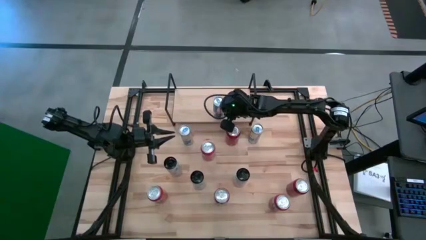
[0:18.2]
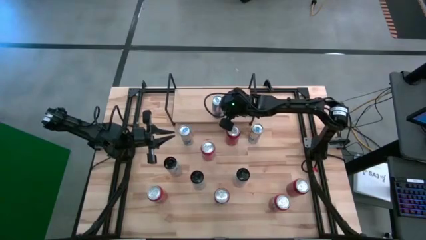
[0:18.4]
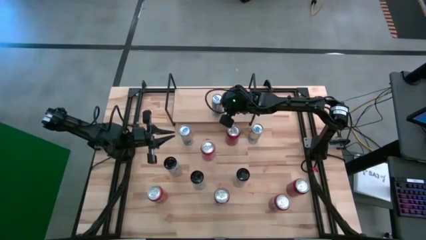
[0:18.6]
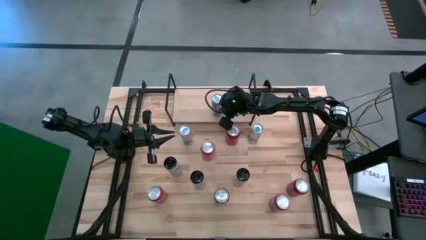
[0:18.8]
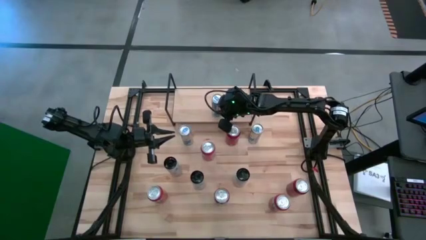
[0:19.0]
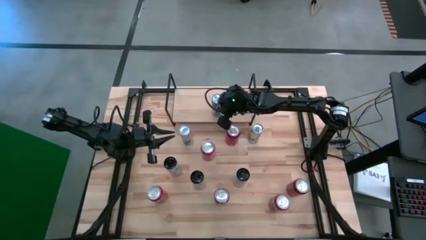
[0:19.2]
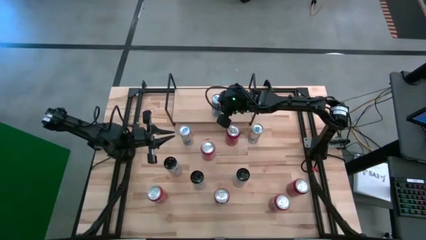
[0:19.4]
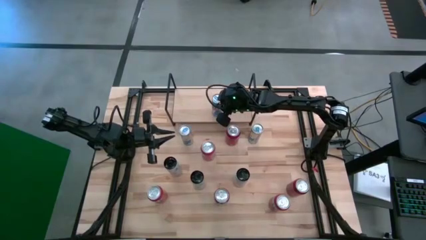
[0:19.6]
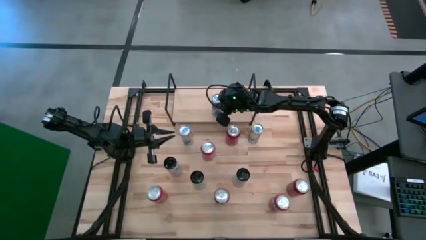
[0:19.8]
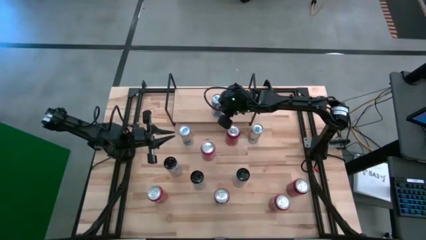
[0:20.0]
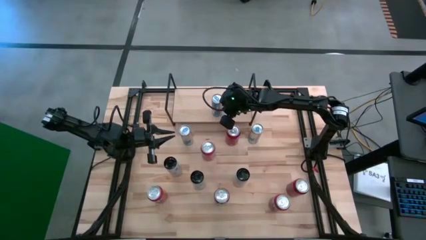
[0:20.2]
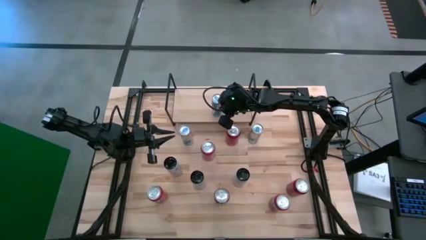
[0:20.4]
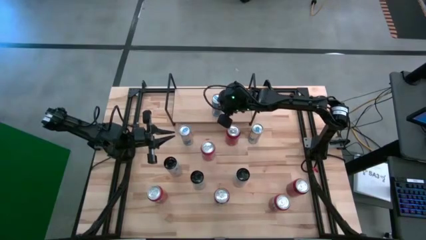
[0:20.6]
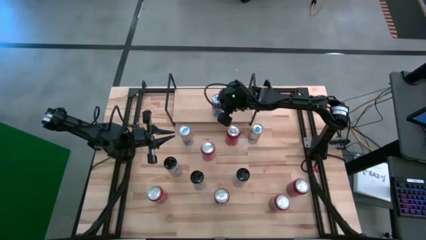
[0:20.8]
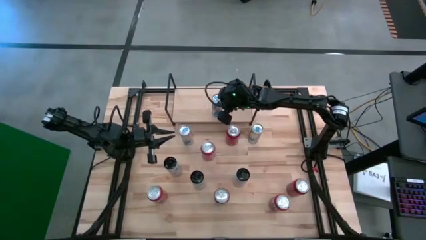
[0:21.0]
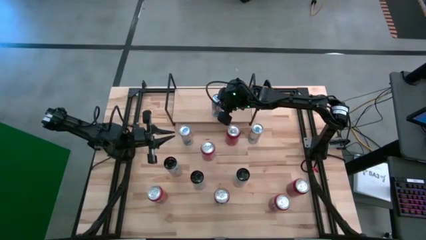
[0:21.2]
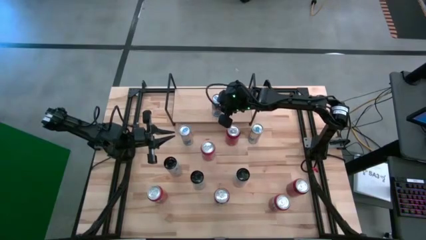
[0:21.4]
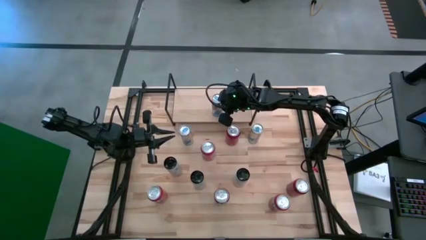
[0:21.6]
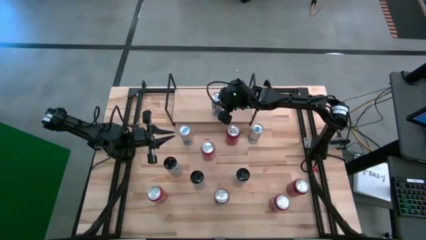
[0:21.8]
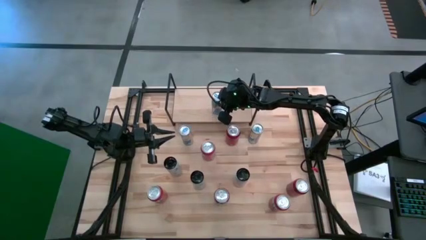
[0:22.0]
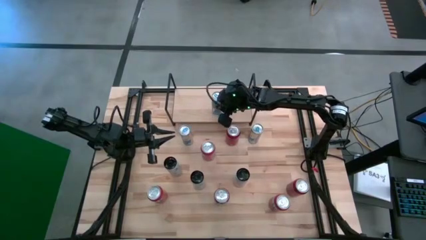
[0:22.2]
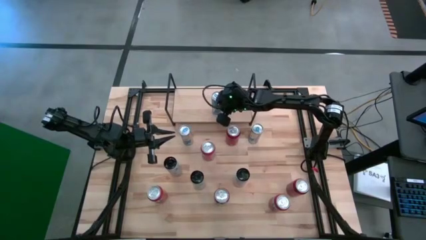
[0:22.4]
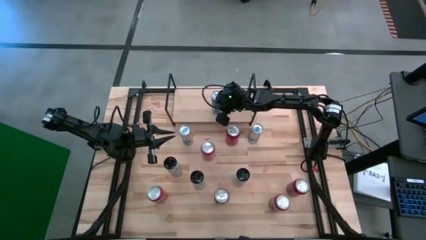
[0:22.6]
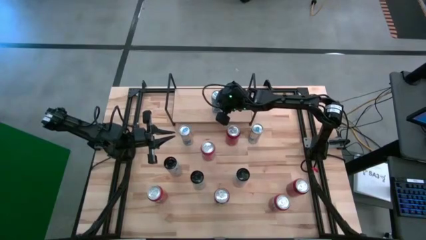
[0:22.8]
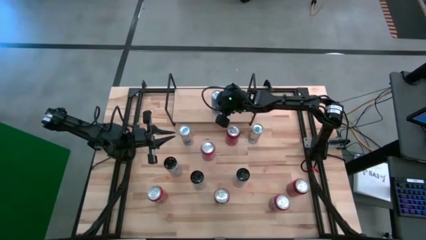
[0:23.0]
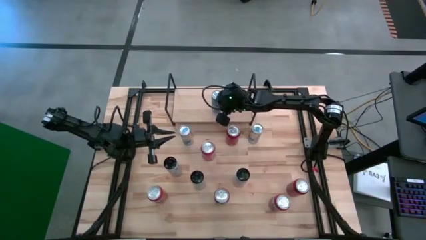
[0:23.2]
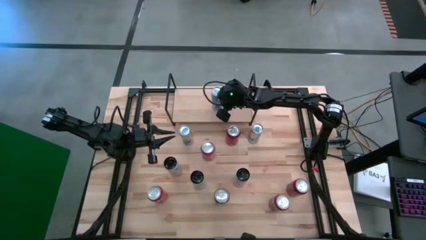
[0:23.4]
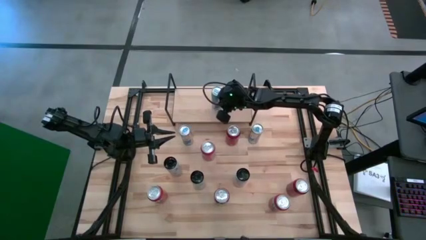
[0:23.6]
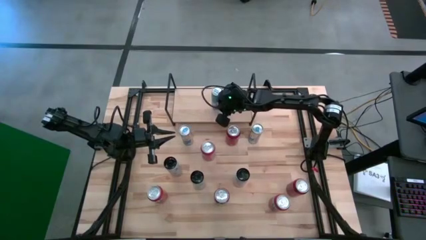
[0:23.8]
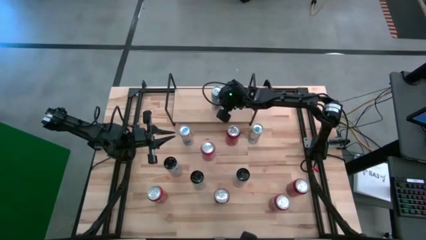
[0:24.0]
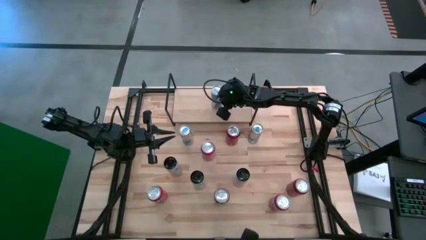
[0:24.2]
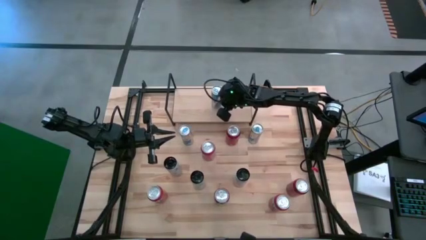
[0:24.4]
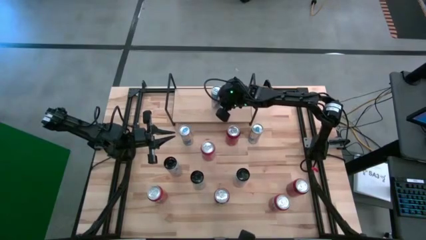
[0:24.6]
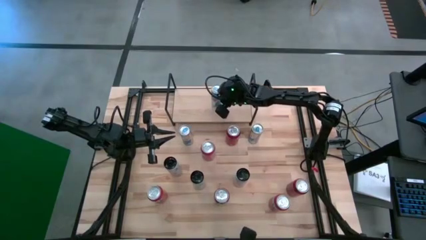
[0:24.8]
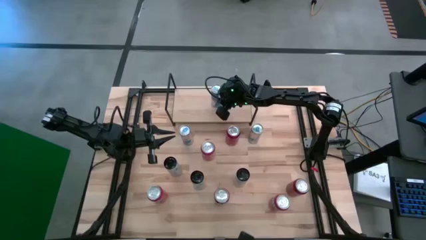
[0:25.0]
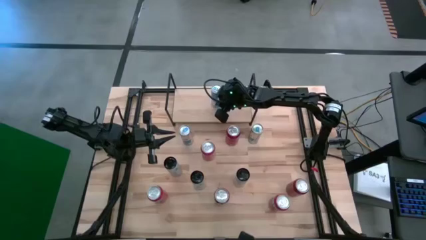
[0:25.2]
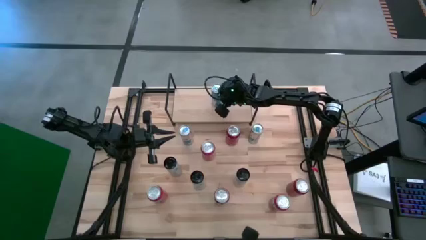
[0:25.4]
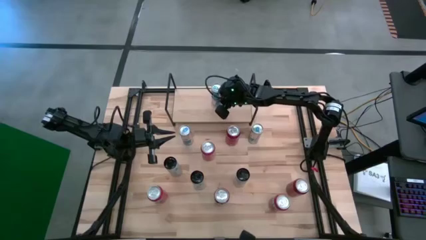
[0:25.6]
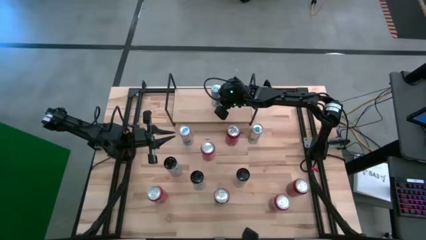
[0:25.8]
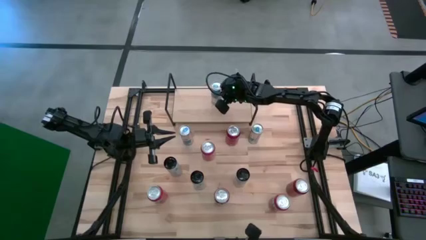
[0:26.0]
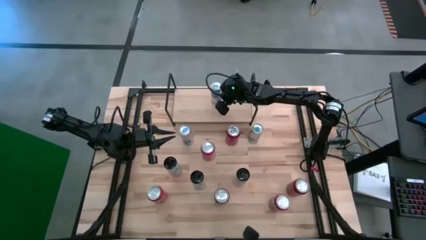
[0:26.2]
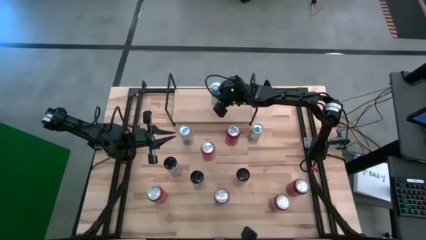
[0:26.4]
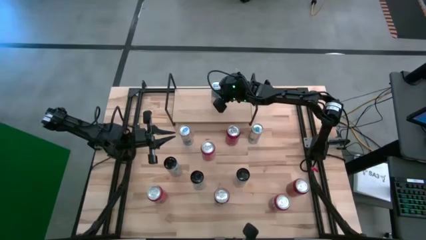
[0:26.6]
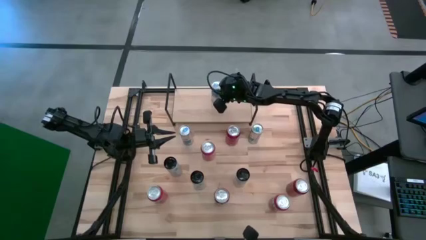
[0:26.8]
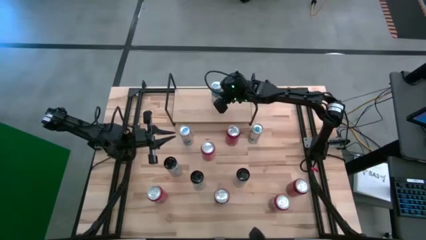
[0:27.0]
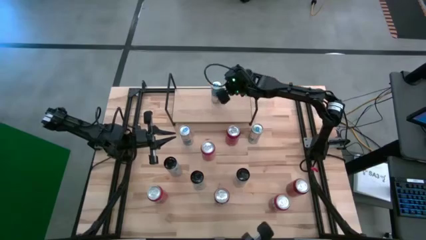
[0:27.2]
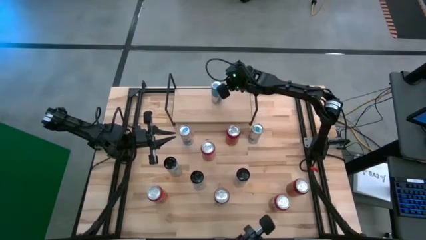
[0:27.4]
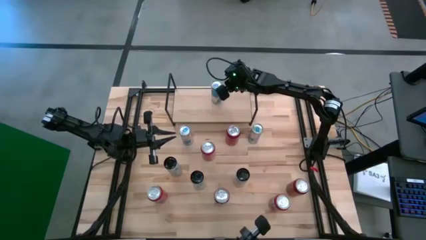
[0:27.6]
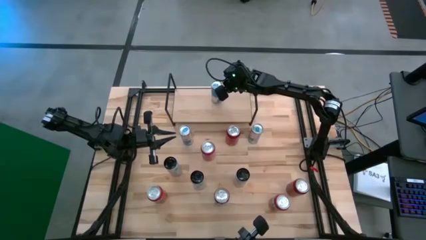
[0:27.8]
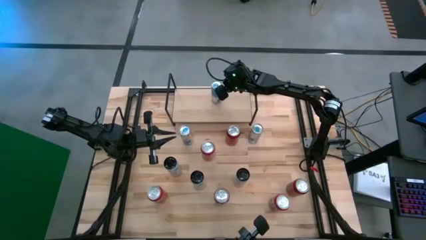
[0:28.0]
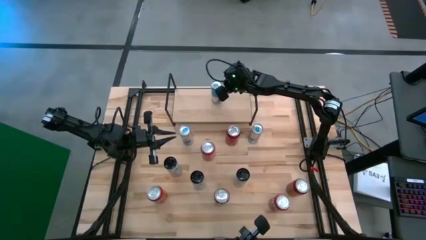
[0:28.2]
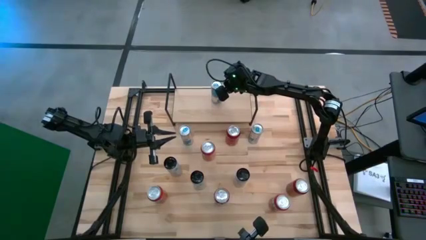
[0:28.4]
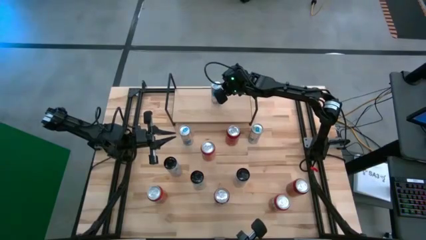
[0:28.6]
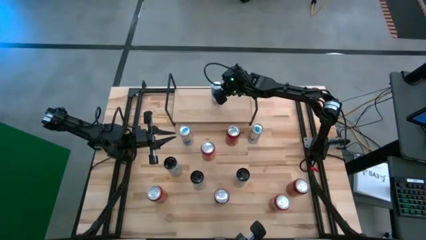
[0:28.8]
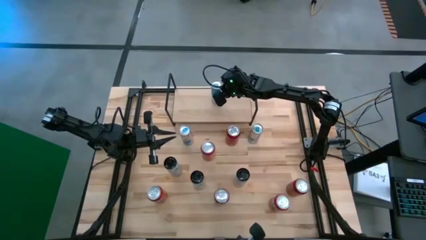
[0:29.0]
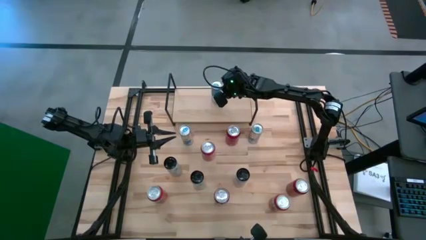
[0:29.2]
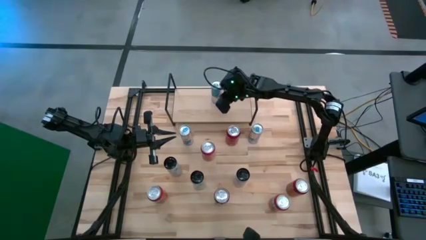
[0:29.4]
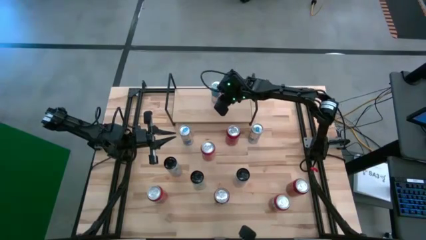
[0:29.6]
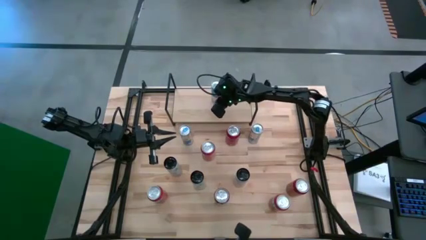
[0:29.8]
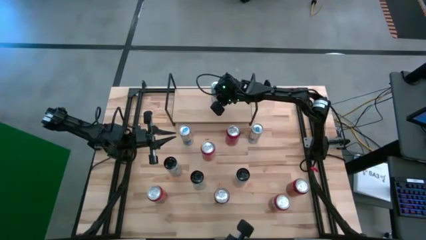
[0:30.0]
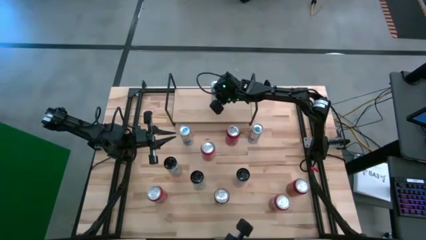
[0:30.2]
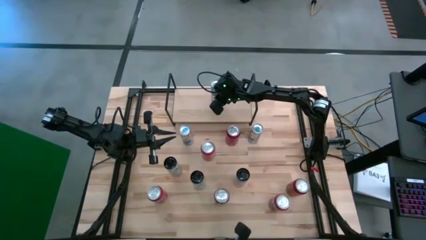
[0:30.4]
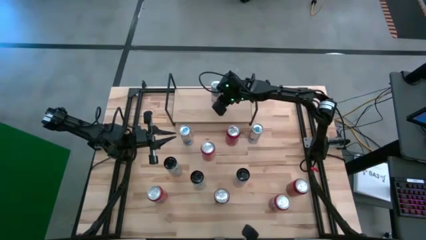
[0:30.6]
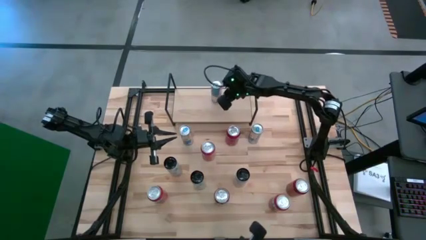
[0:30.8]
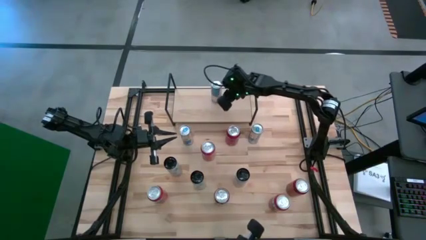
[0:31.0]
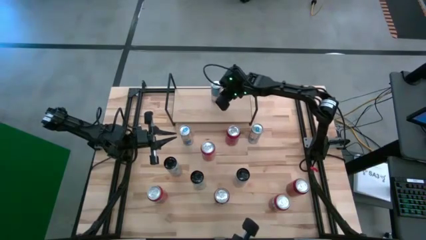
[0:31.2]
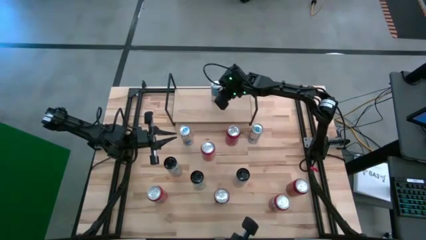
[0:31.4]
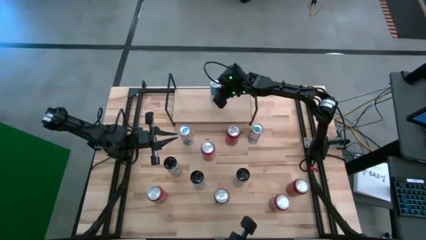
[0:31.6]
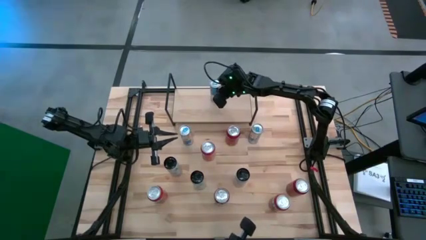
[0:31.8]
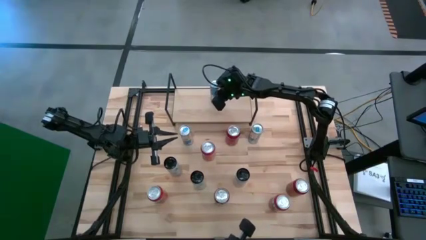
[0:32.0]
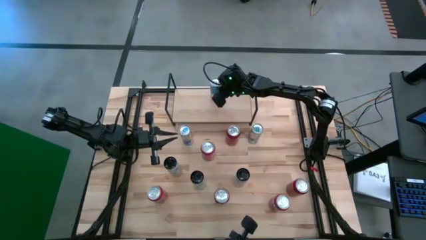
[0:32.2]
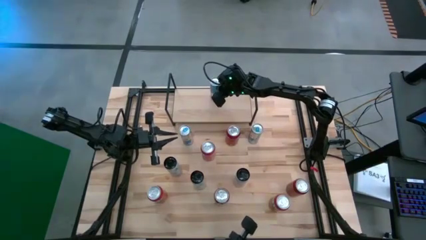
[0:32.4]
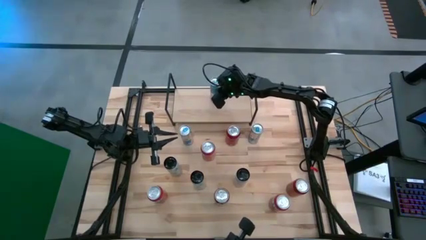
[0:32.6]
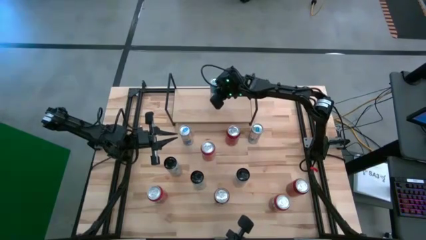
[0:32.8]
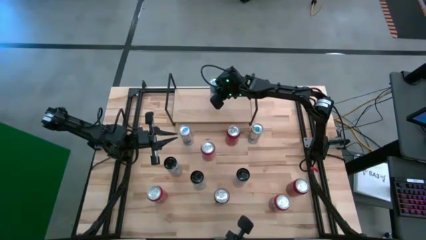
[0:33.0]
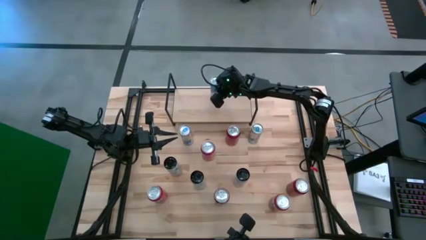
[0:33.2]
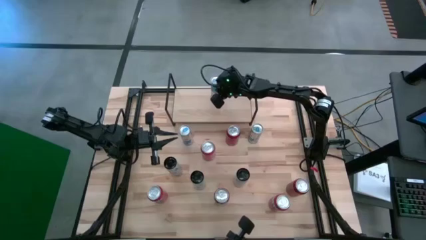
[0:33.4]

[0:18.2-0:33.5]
Task: Place canned beverage on shelf
Put the bottom right blue soda can on the shelf
